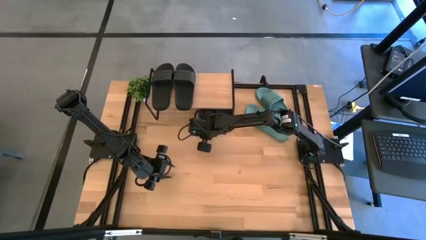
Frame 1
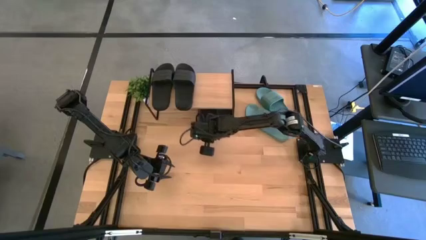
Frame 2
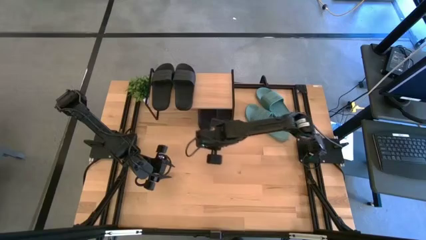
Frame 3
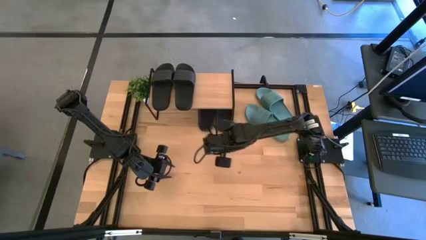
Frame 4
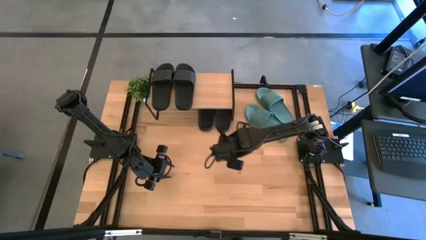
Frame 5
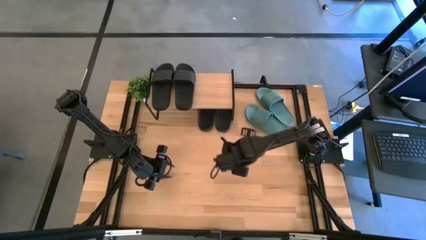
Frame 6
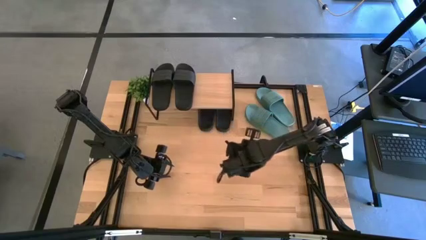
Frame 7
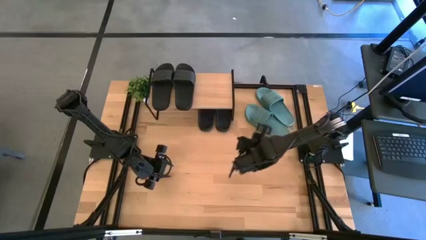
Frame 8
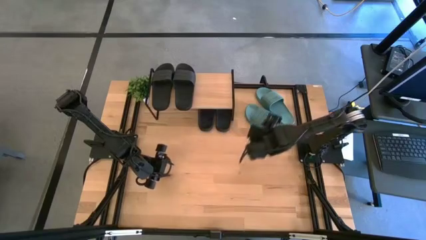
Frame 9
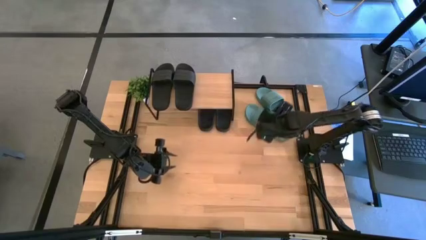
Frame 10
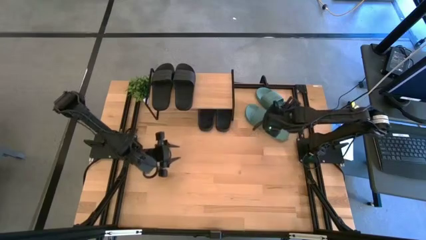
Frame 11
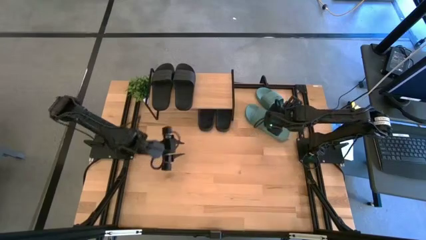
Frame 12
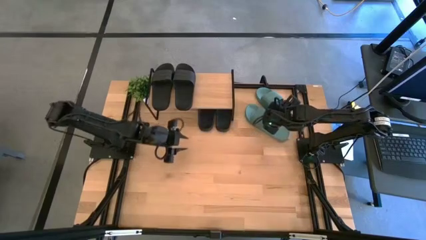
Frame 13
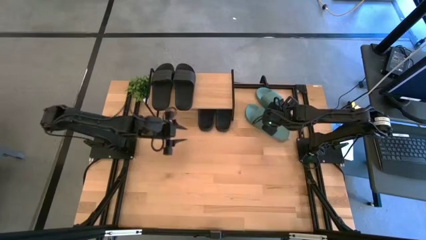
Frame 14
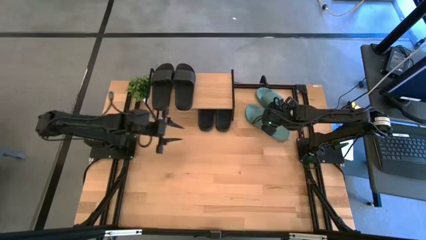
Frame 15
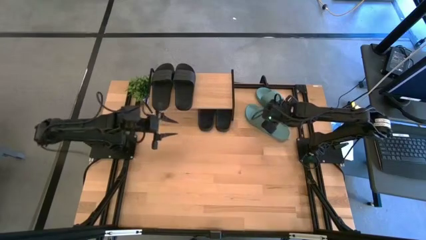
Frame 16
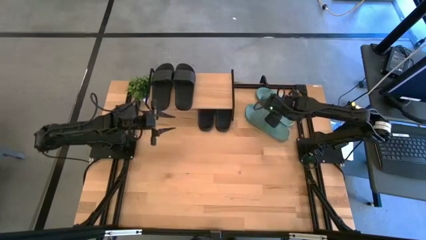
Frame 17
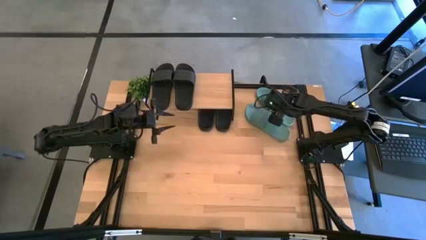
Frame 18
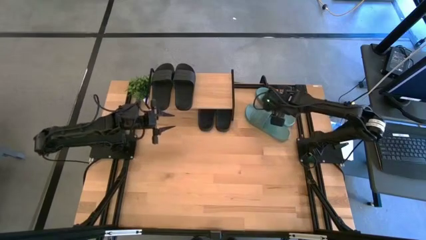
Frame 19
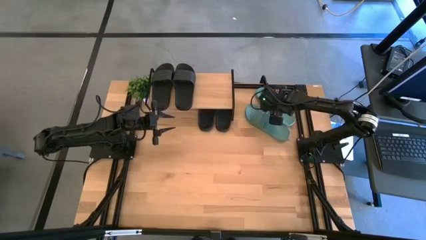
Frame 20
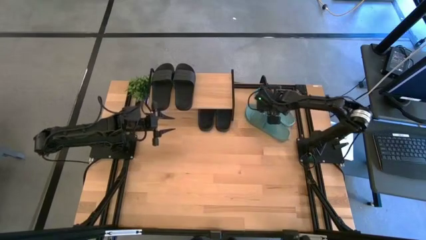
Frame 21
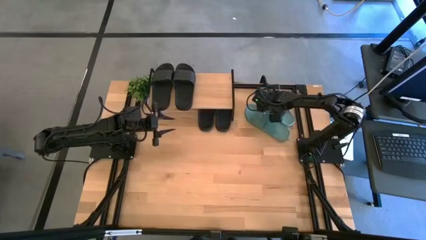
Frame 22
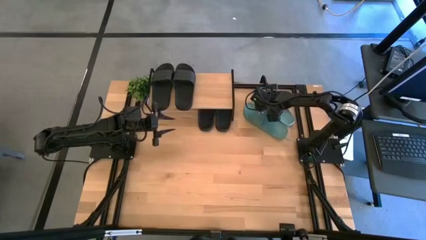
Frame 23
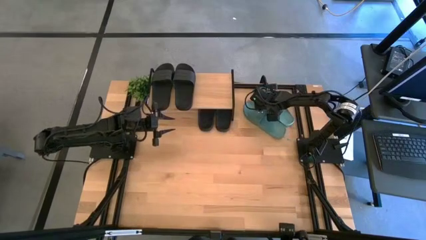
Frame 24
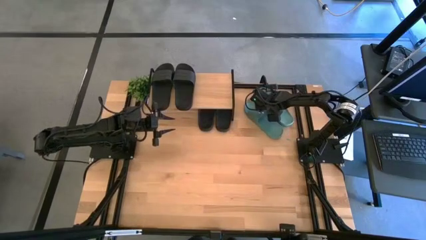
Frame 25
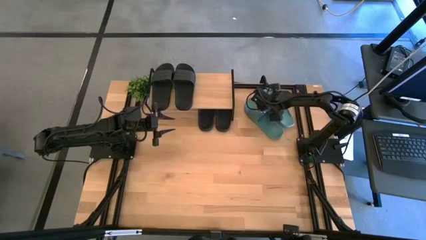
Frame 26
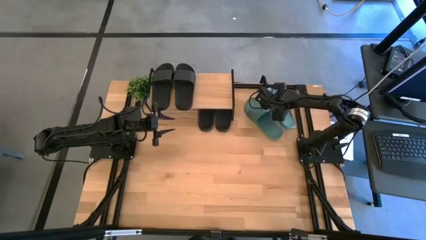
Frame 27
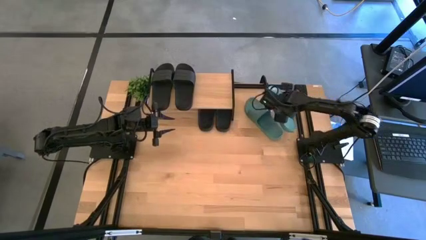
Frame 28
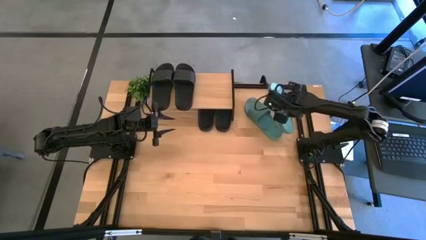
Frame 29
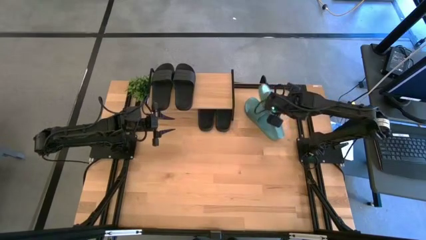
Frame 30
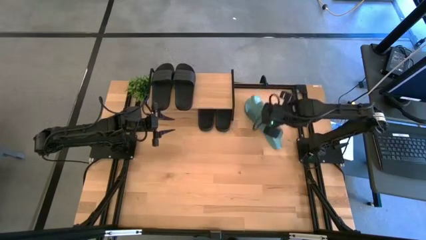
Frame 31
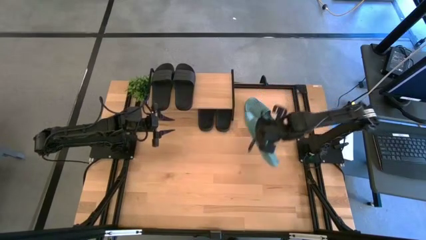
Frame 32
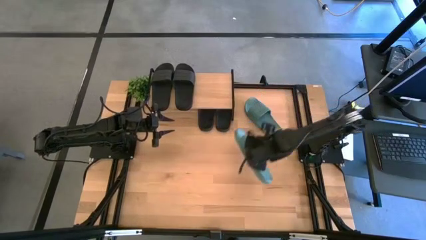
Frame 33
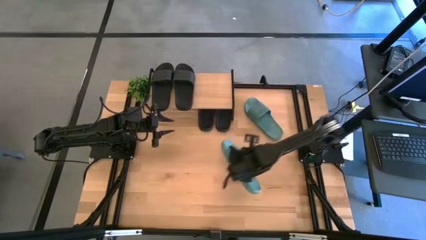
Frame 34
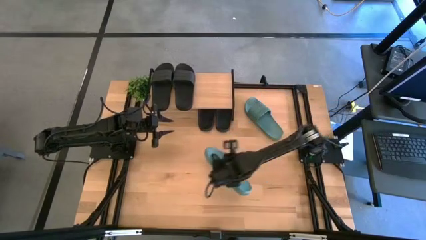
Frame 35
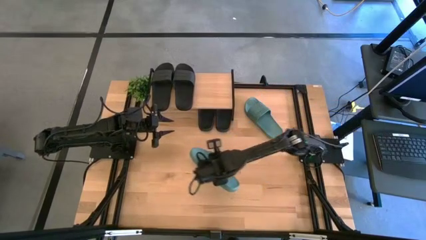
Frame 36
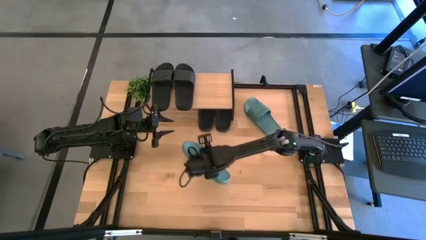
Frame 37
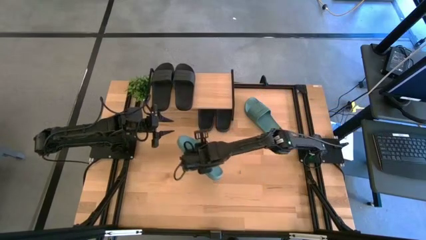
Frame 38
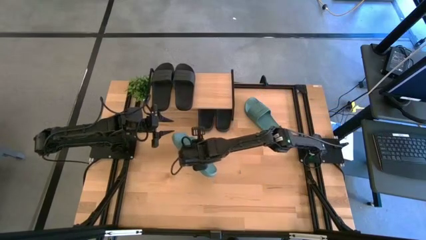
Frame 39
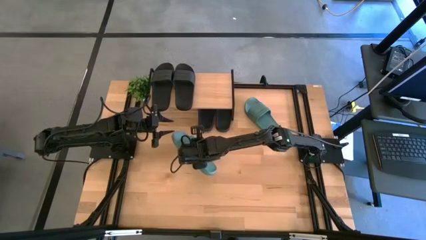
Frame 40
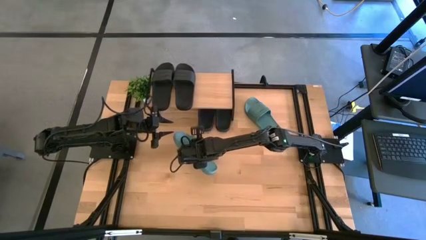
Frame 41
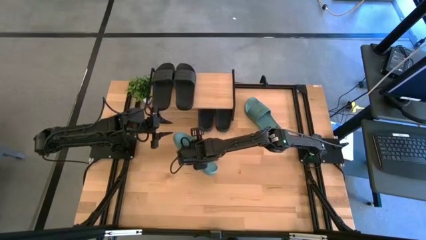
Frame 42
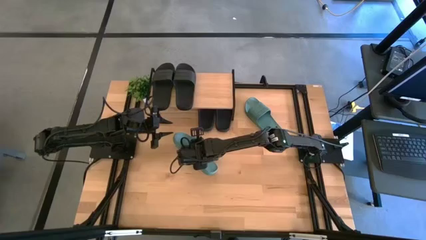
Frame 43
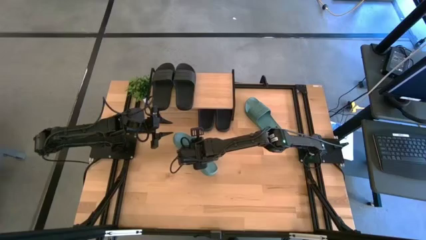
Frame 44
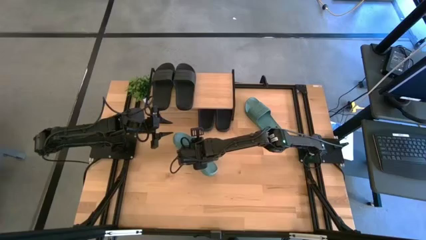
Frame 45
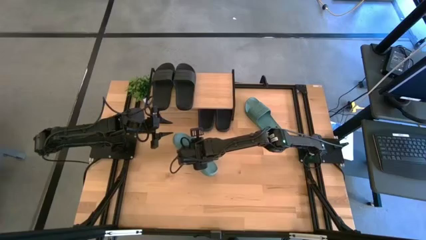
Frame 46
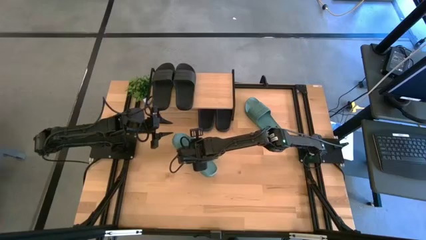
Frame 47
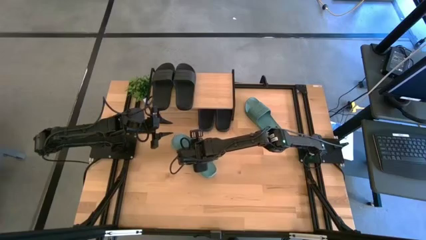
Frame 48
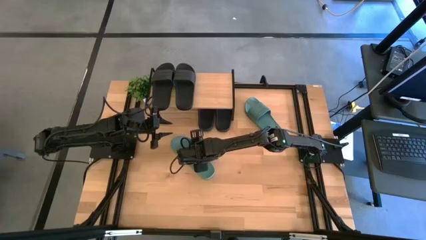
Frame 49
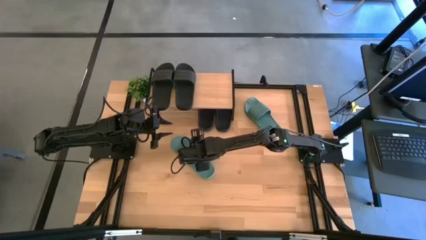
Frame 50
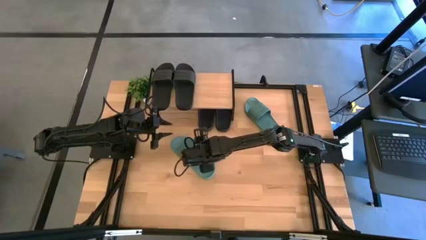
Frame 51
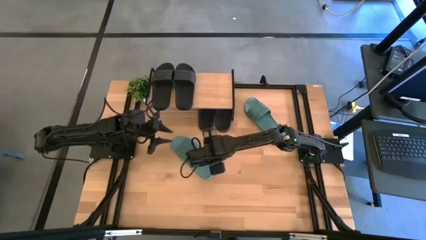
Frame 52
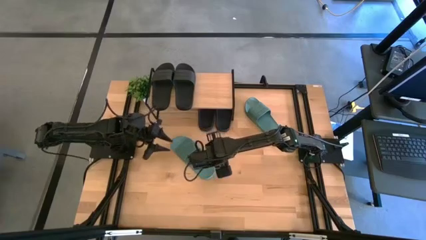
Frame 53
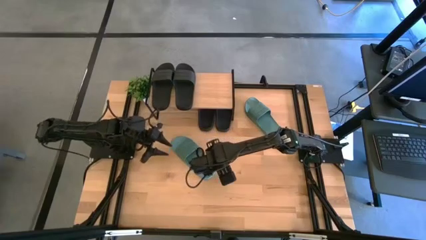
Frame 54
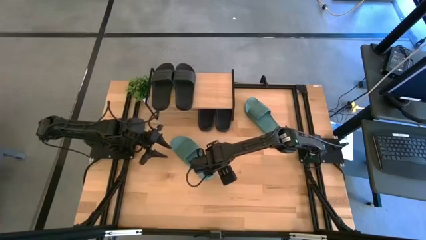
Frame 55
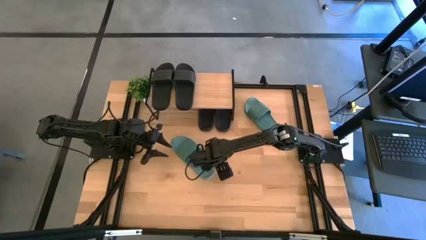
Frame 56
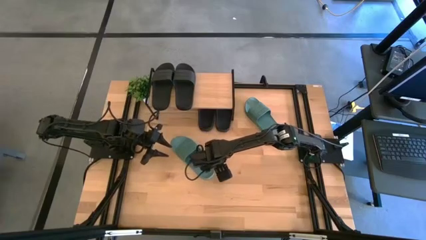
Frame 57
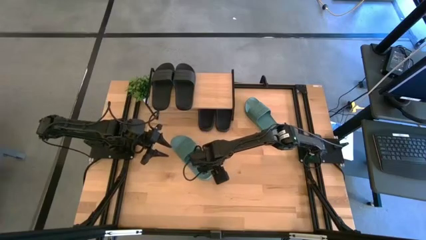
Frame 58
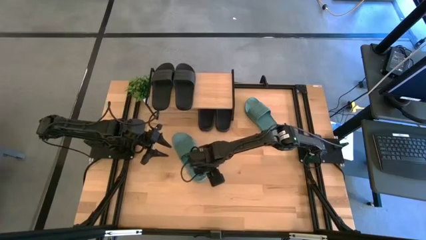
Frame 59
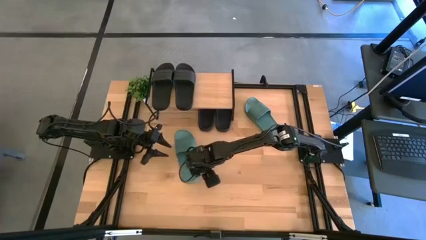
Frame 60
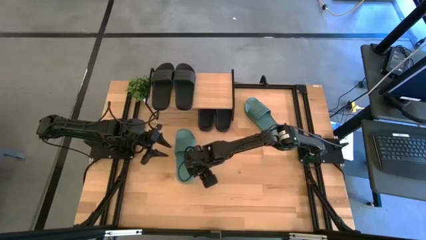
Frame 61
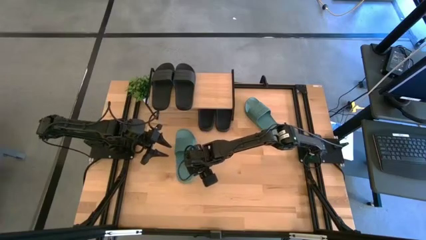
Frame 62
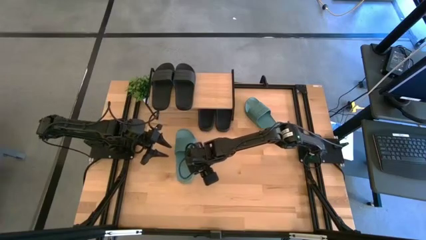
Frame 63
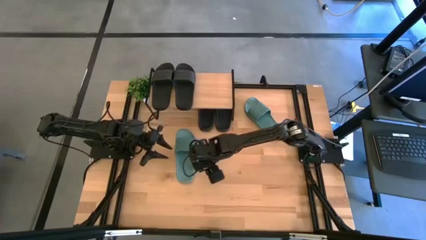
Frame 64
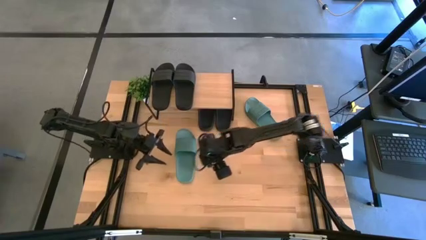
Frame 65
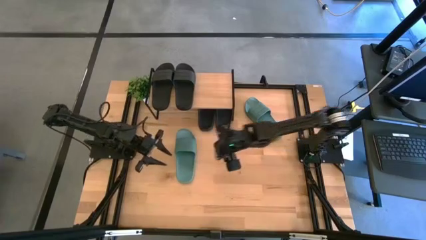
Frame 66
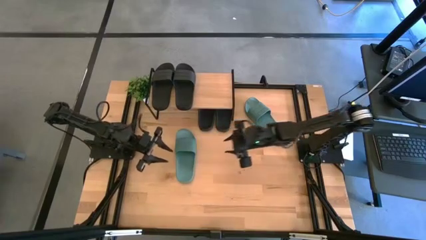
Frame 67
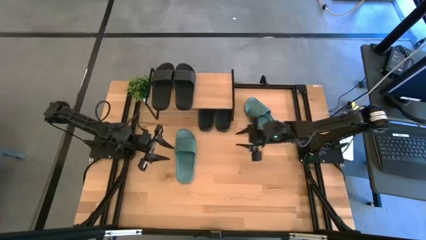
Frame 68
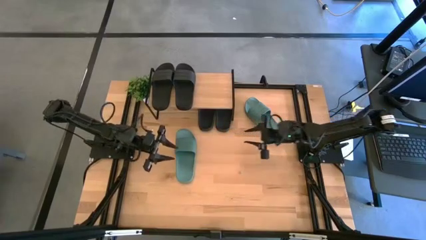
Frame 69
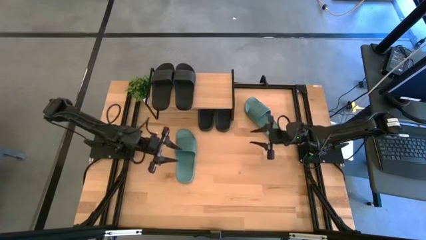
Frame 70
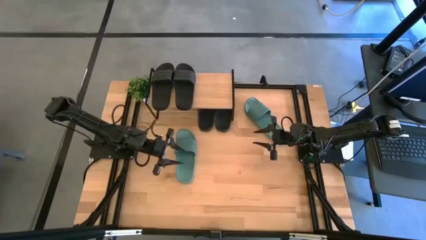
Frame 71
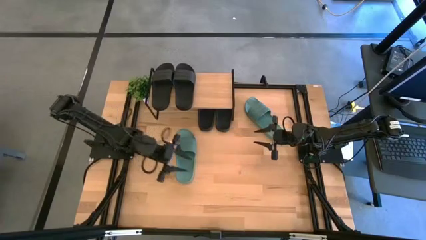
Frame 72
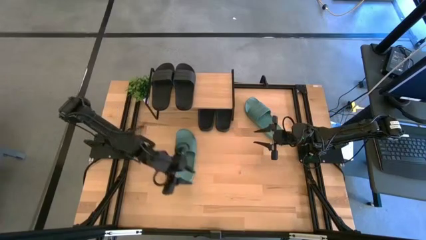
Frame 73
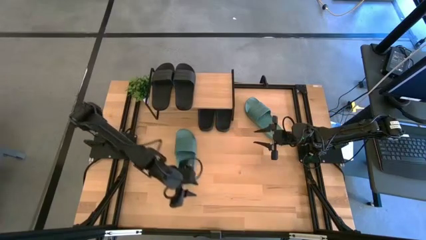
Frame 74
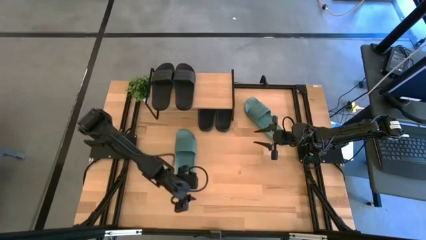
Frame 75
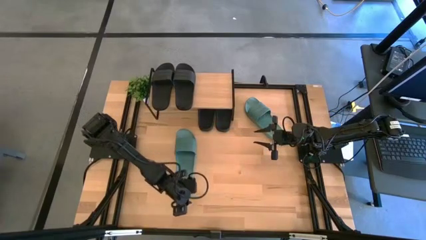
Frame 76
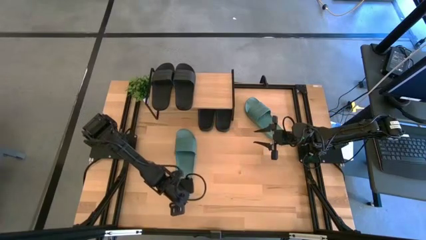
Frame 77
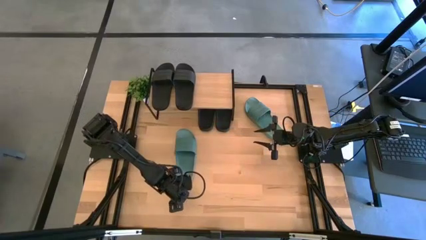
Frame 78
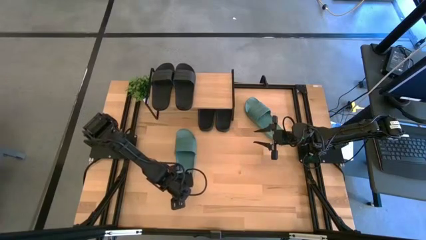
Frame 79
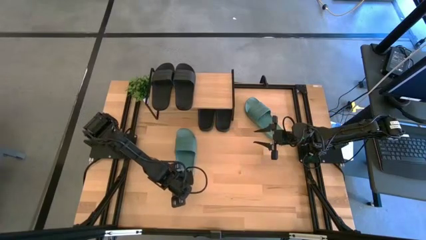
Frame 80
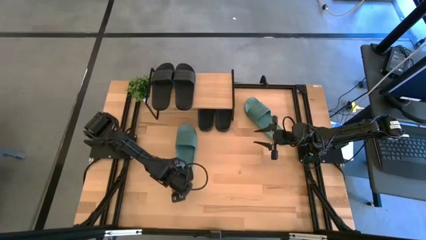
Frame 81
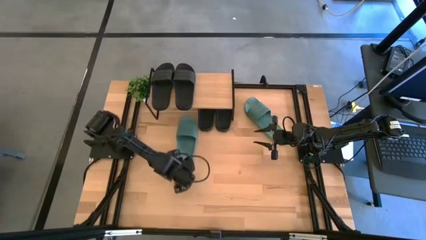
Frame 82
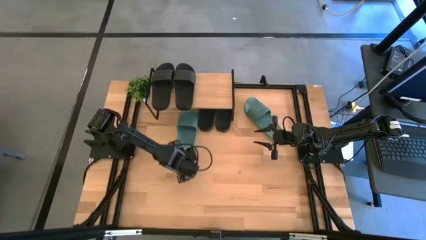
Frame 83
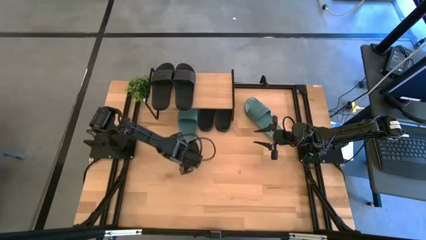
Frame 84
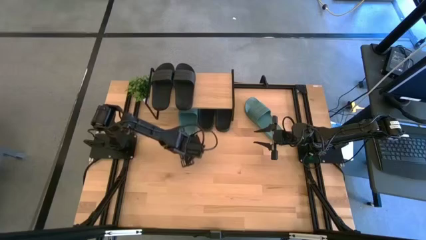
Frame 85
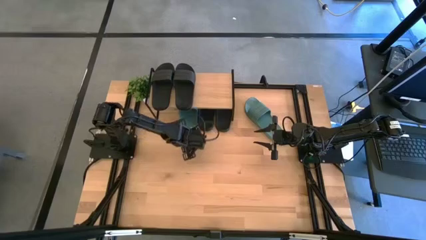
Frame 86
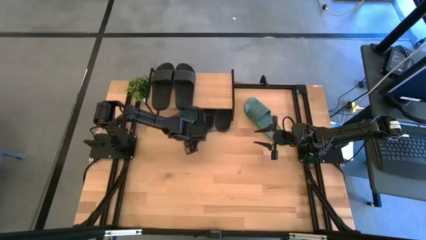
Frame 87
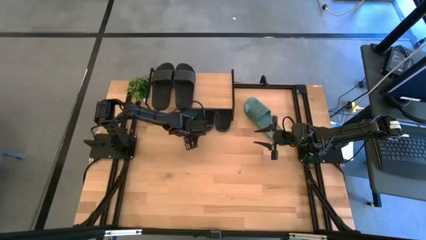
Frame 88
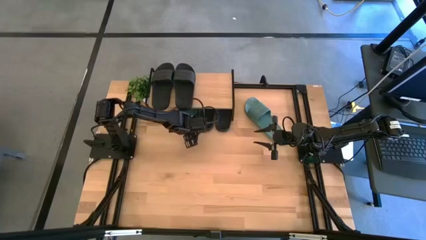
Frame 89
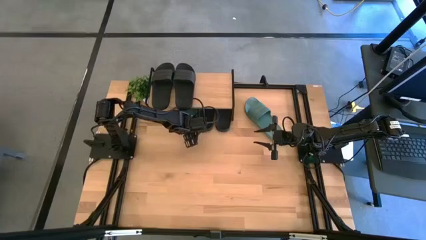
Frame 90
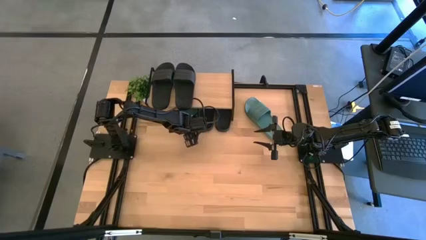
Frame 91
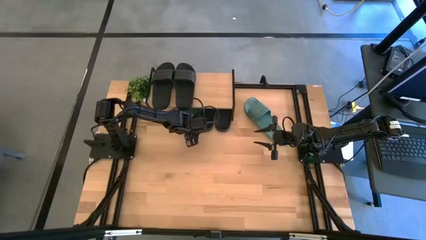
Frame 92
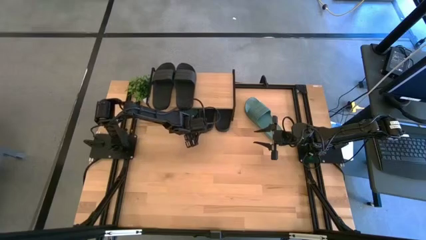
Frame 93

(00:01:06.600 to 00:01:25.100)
Task: Pick and place slides into the shelf
Put the right blue slipper under the shelf
